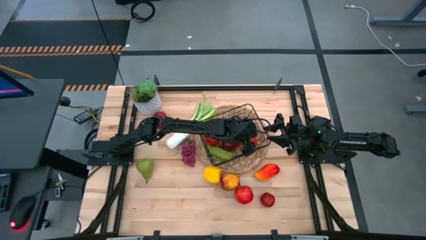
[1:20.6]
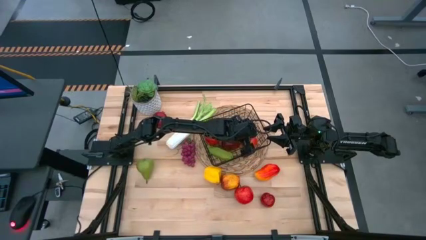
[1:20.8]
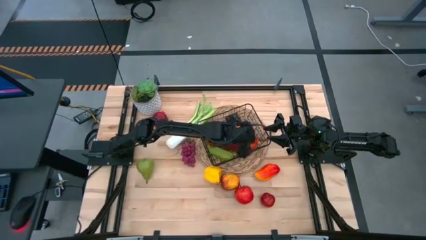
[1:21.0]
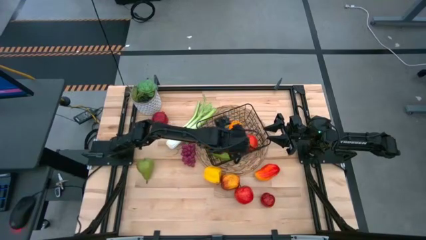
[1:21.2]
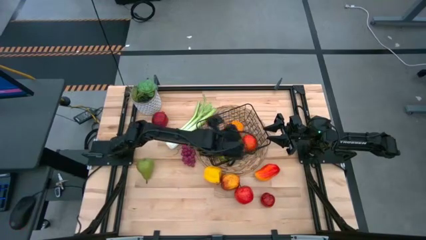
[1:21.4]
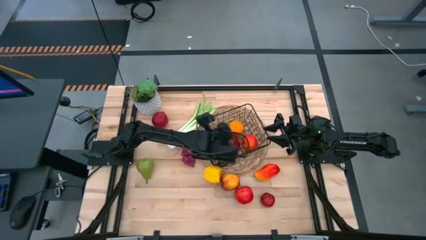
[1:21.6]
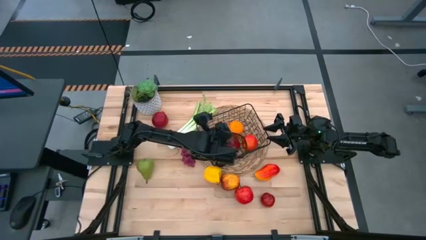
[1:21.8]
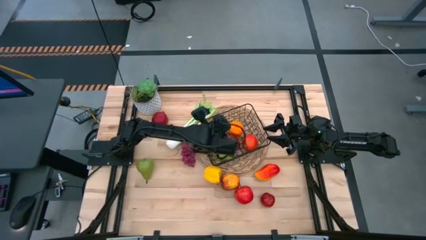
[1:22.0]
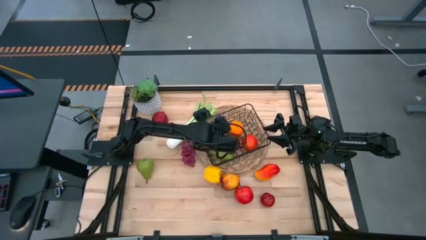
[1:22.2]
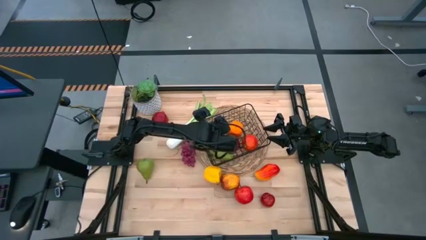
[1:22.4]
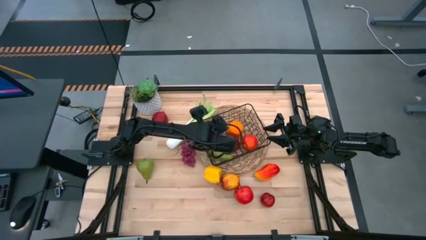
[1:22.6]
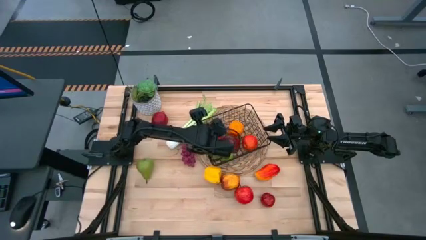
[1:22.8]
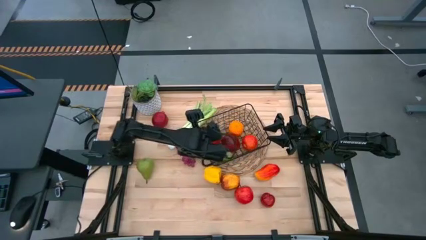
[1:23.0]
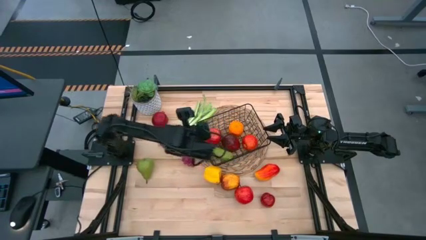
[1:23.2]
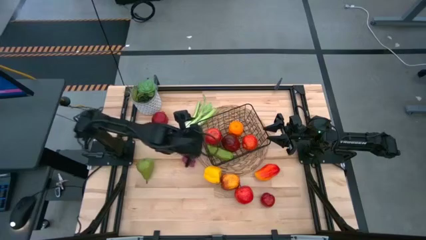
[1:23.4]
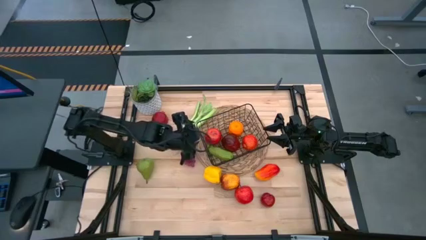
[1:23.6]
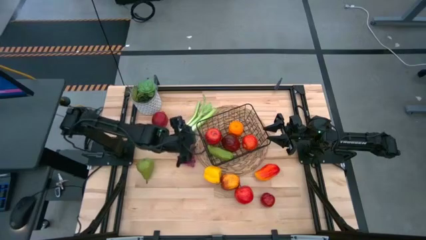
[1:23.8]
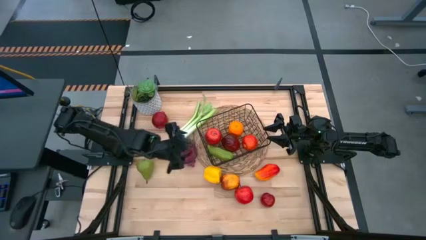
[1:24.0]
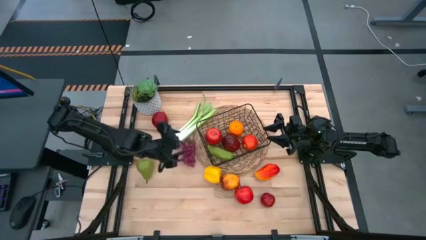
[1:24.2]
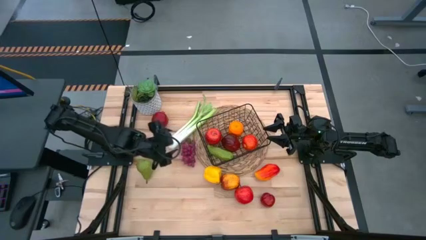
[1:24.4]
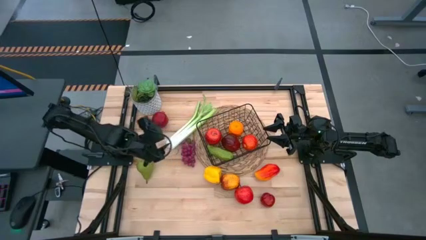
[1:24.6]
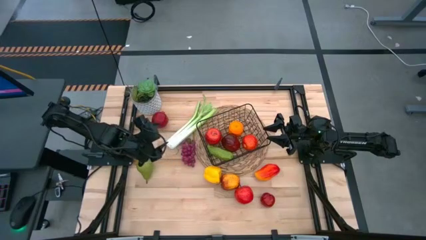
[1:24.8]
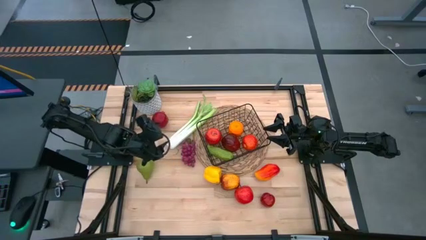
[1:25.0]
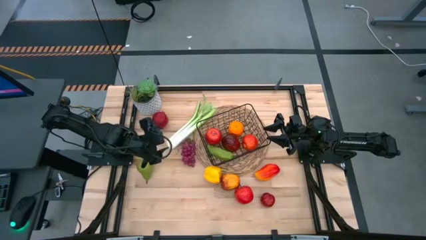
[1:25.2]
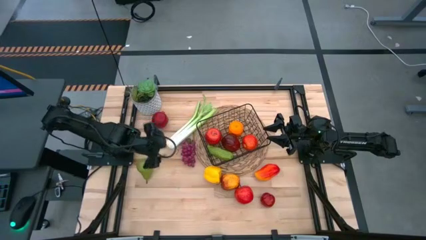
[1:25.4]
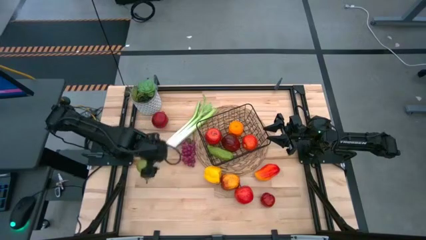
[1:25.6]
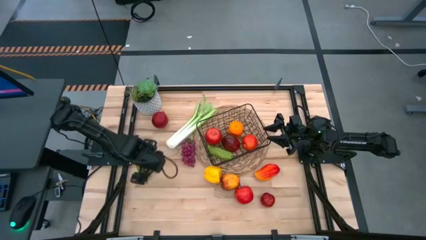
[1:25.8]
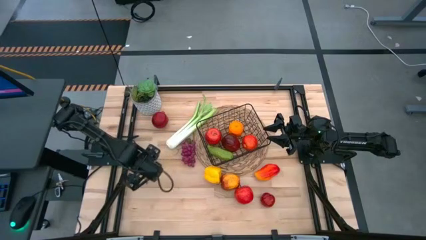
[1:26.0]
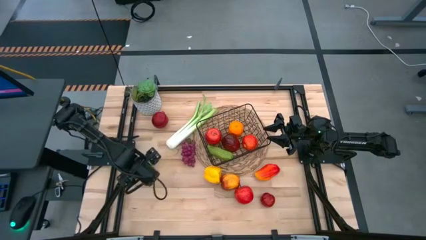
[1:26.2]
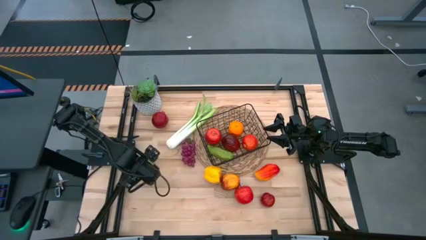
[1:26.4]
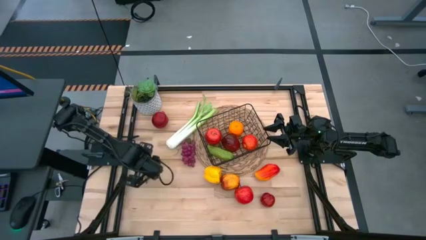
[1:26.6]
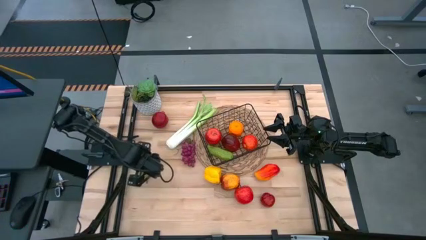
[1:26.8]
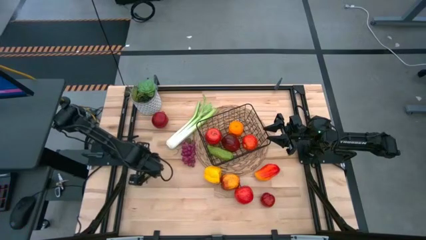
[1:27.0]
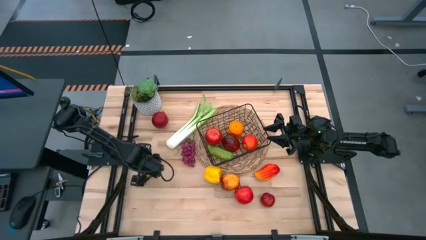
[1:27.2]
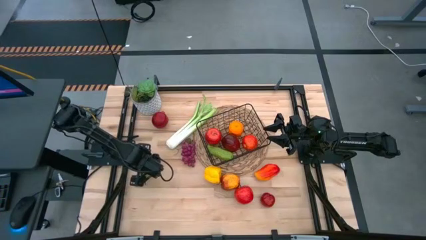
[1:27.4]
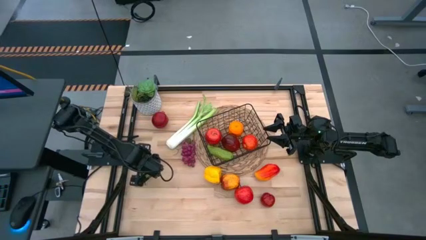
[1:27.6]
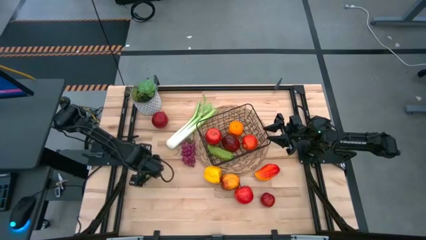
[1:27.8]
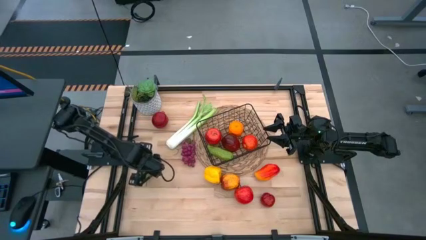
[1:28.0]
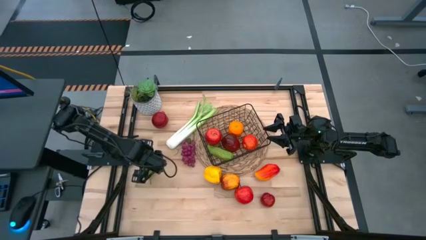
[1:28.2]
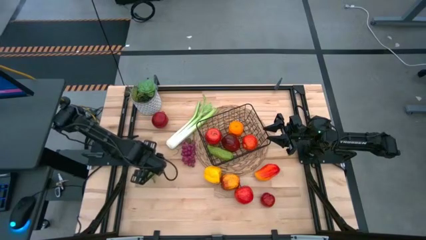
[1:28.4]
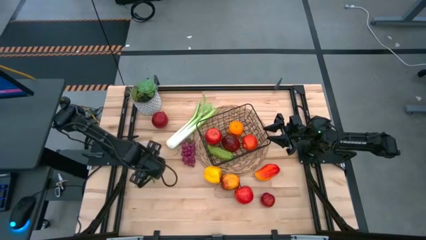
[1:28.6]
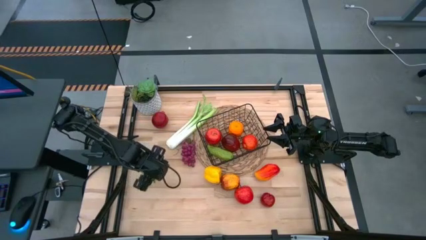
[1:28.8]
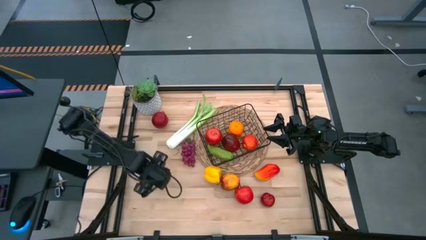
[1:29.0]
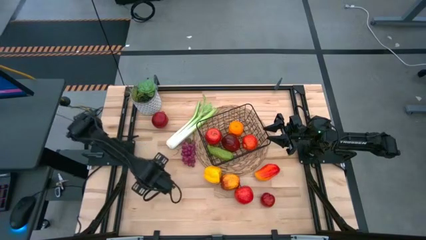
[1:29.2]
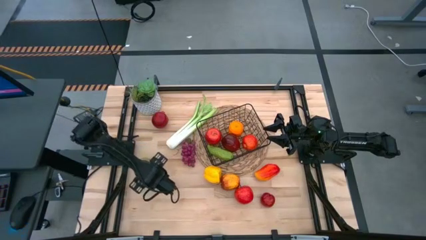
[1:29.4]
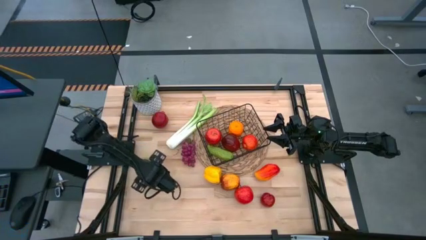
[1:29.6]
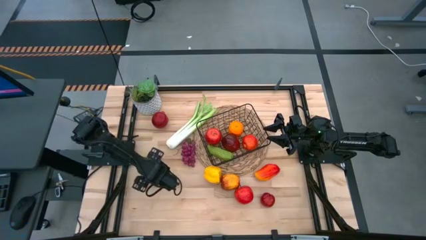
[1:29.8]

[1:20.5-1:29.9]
Task: Build produce basket
Put the green pear into the black wire basket

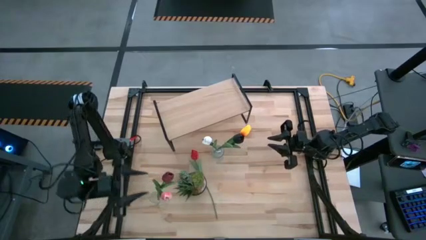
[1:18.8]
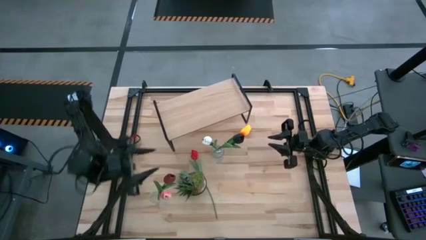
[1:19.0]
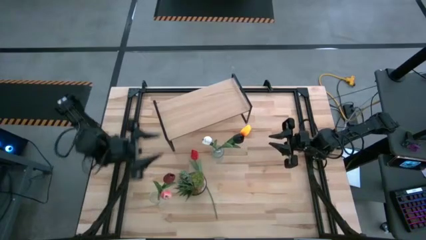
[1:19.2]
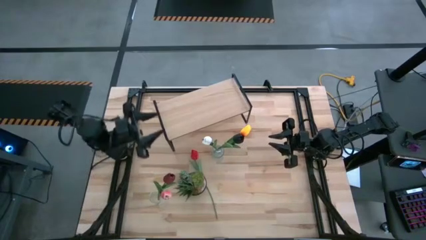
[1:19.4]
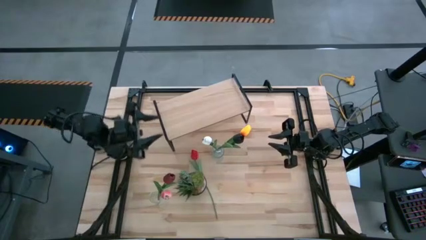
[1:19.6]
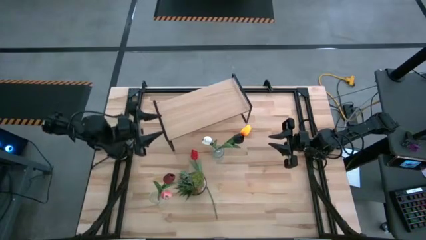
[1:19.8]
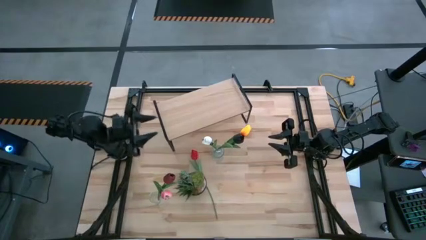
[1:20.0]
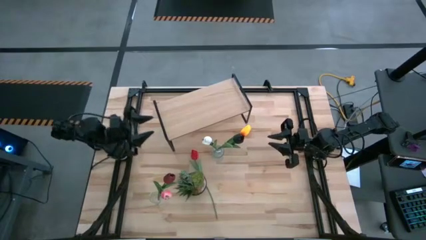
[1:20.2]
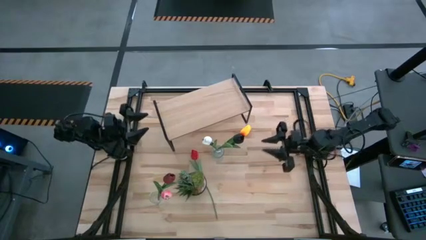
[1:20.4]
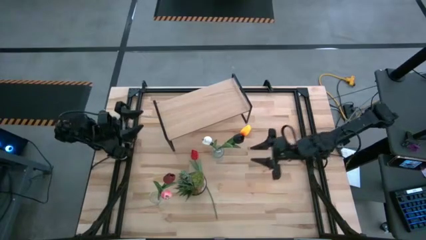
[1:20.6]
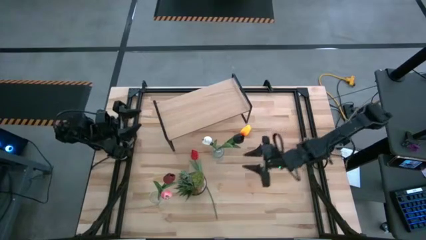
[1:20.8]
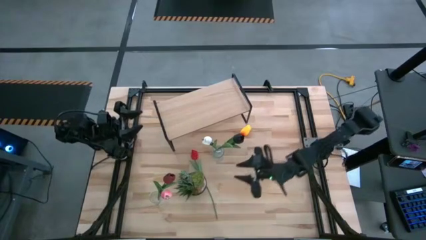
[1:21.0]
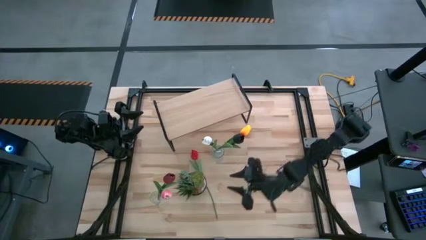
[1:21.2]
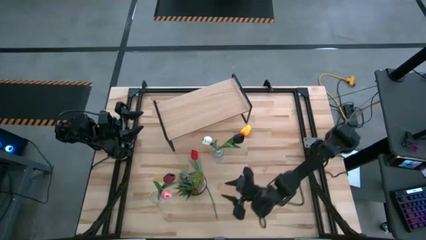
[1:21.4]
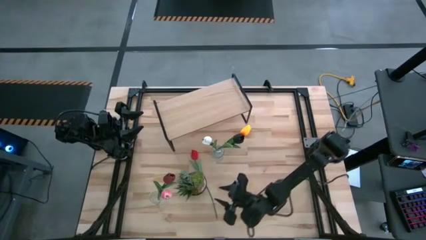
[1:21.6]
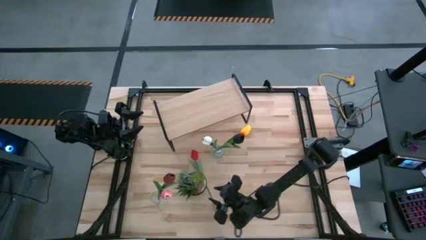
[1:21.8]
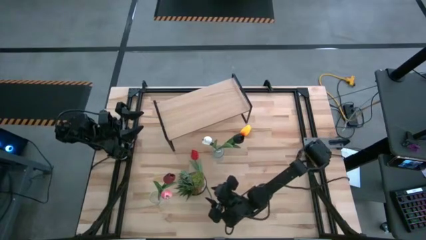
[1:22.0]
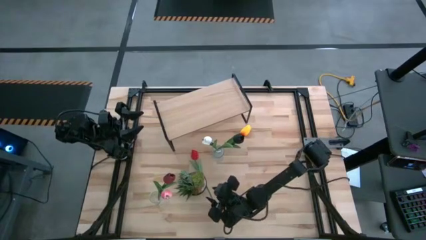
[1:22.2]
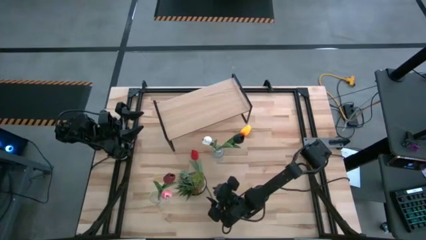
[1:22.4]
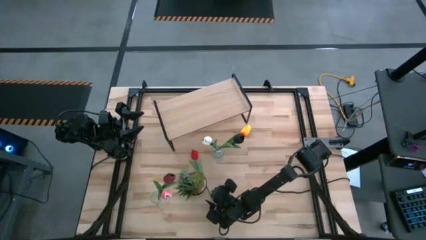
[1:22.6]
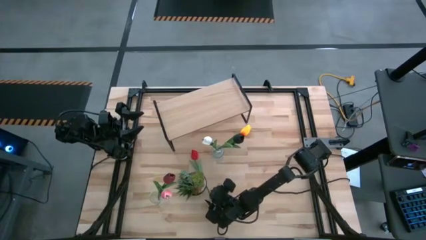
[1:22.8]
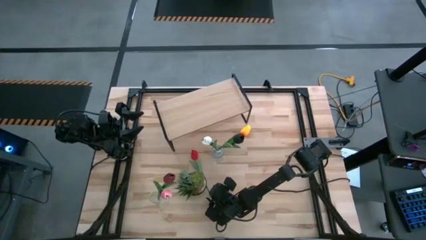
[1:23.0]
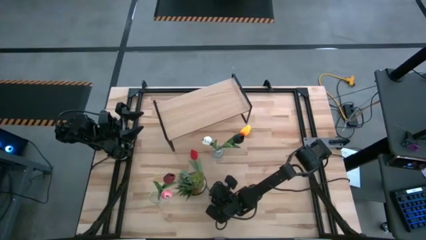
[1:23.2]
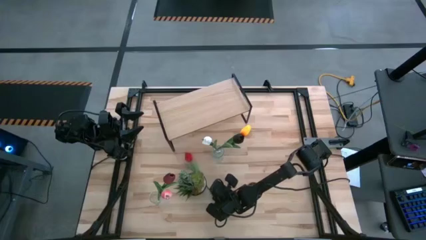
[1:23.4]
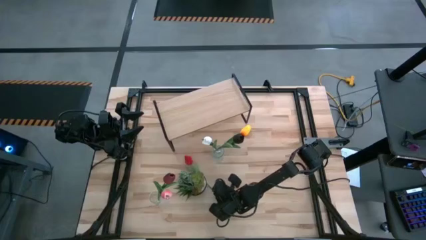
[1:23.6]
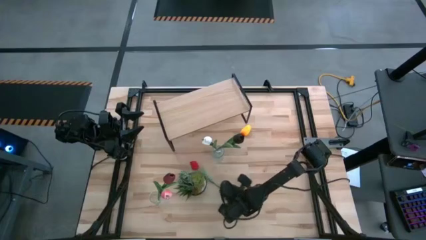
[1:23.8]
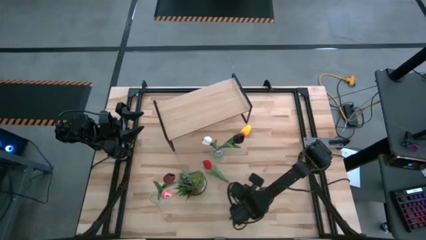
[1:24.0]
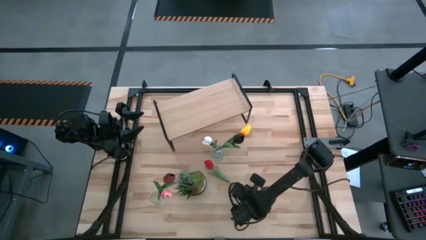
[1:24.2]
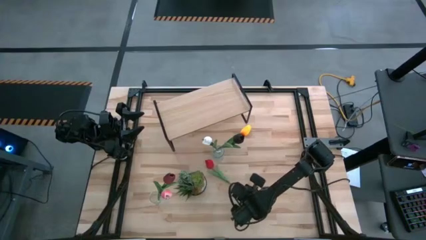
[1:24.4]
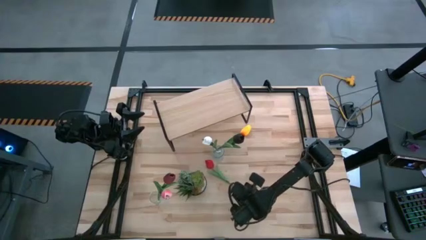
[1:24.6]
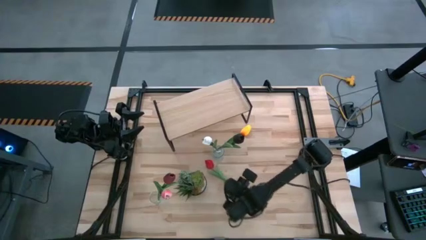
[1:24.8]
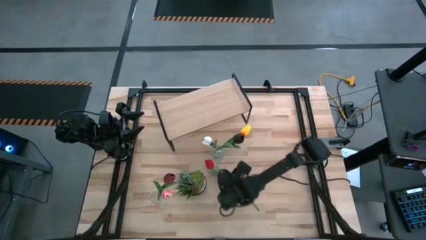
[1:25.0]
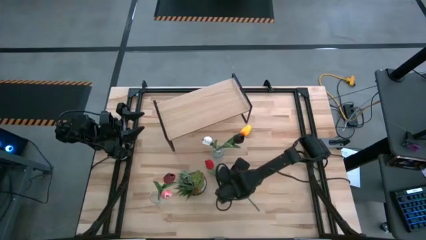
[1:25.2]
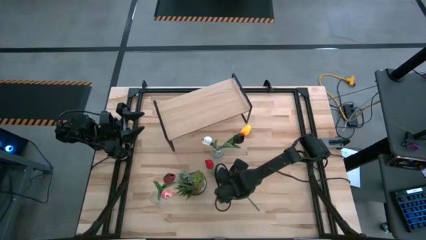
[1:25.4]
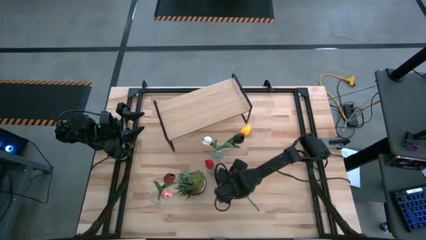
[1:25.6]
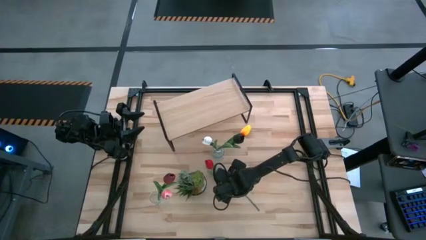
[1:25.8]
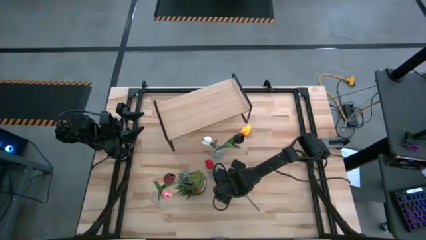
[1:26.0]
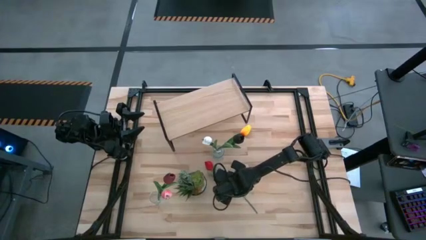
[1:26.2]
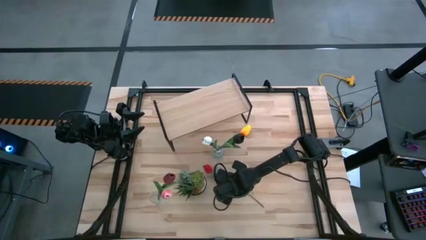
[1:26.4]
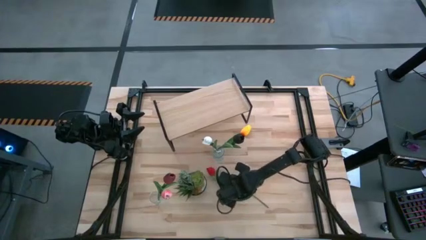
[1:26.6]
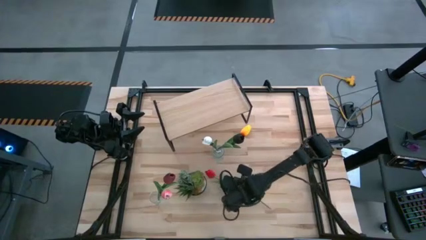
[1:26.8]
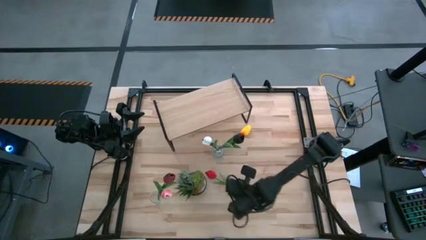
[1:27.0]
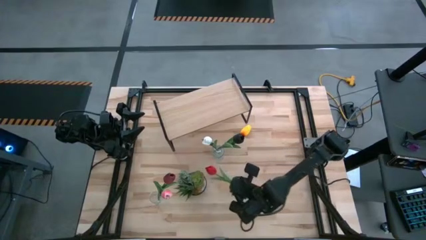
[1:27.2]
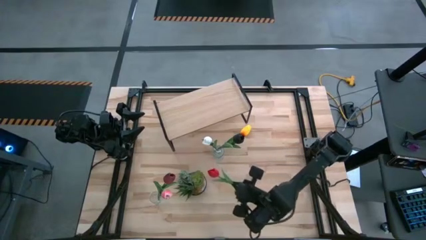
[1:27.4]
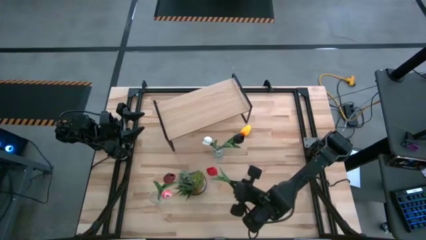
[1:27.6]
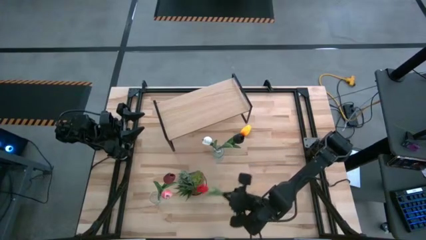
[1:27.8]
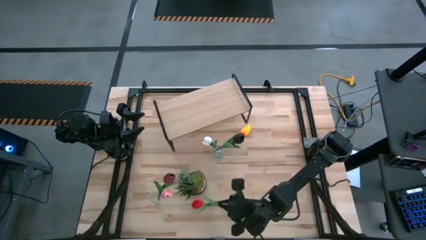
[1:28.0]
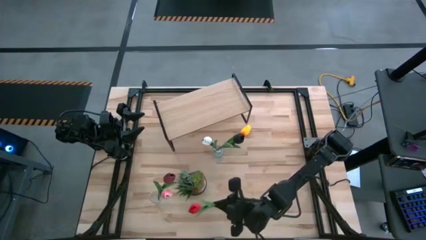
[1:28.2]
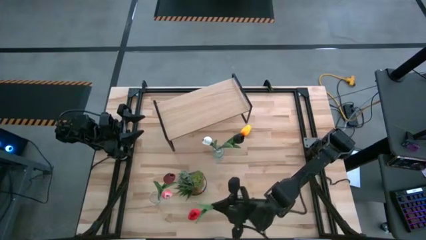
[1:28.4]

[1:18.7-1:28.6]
Task: Pick and place flowers into a vace then onto a shelf
Put the middle red tulip into the bottom transparent vase
